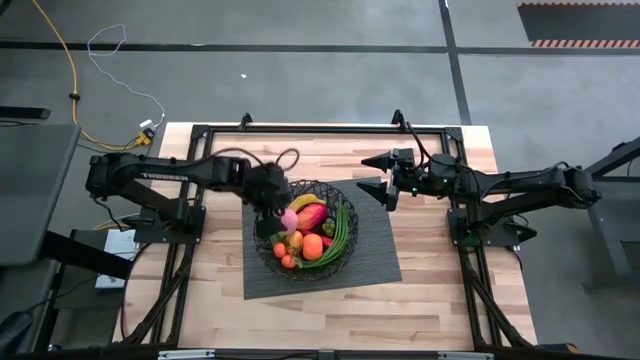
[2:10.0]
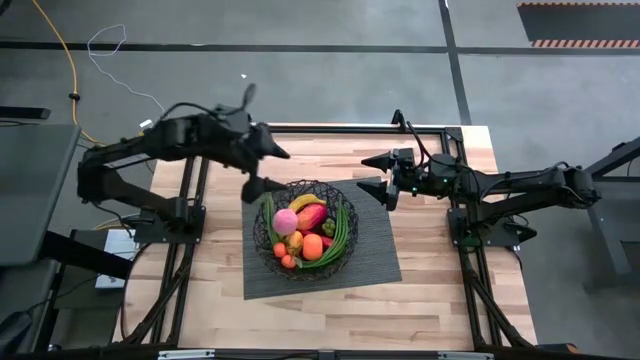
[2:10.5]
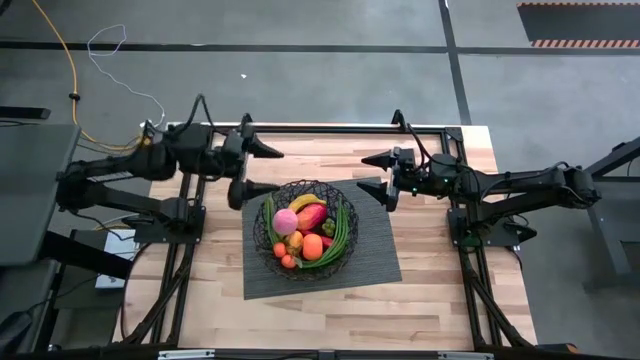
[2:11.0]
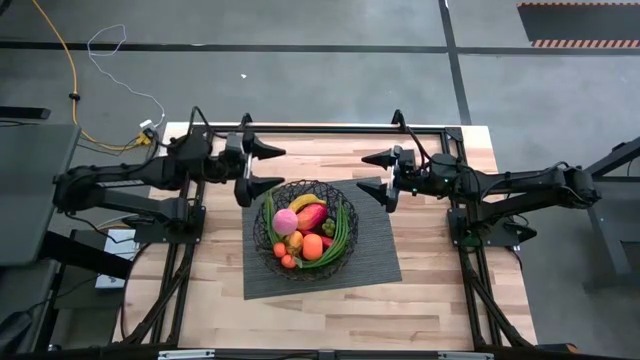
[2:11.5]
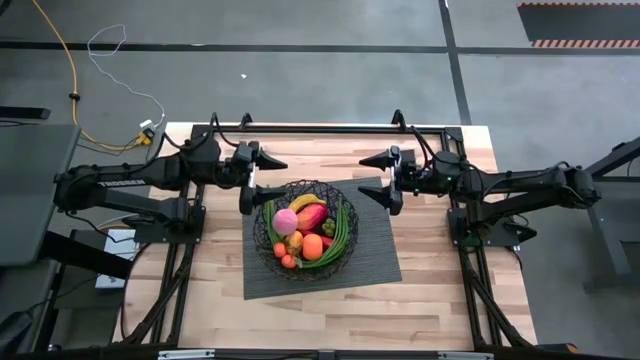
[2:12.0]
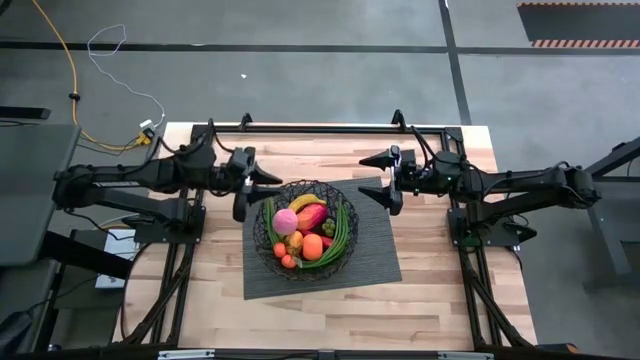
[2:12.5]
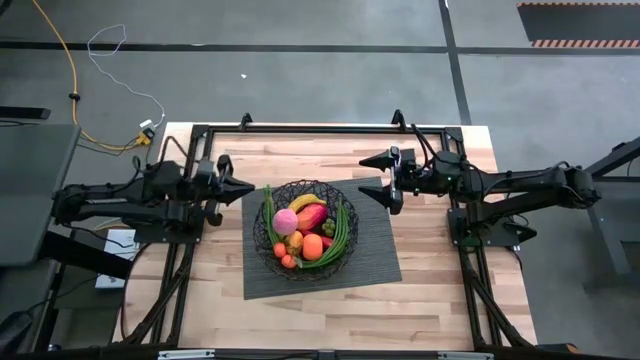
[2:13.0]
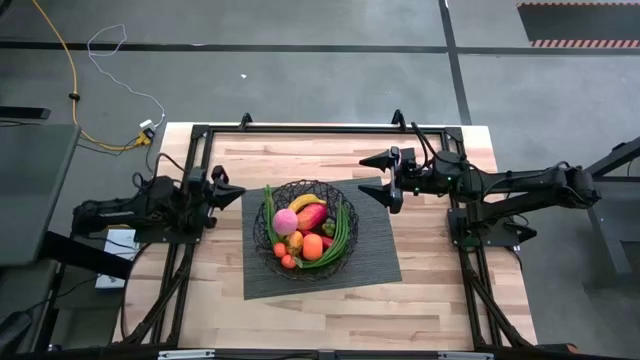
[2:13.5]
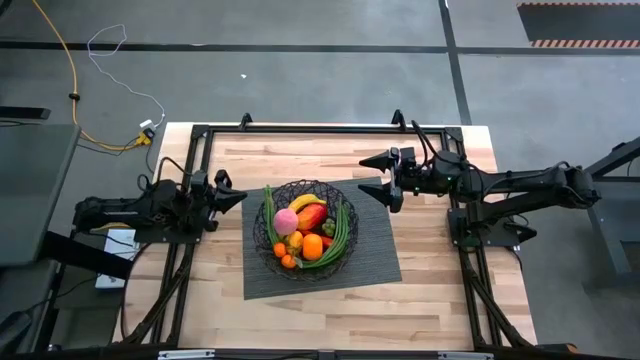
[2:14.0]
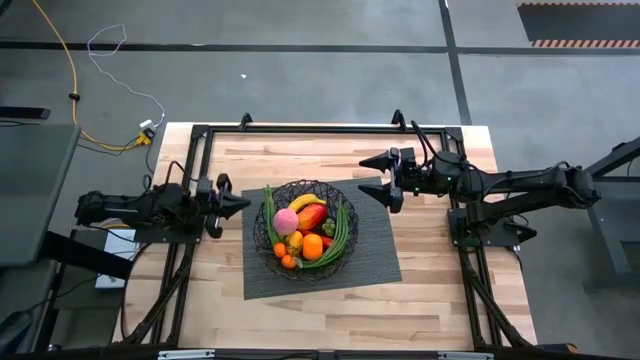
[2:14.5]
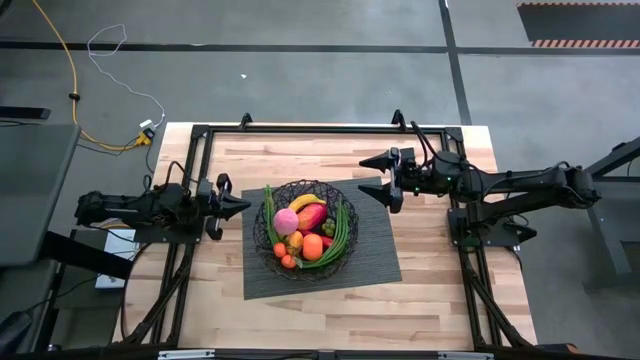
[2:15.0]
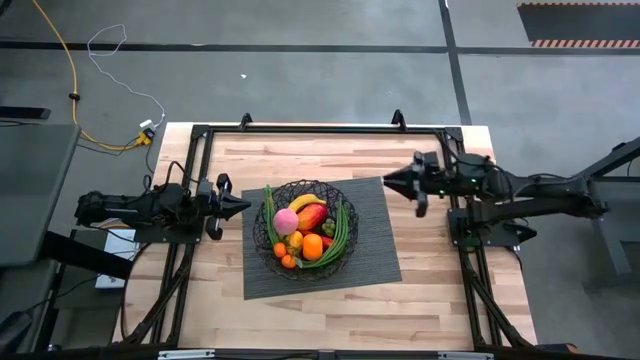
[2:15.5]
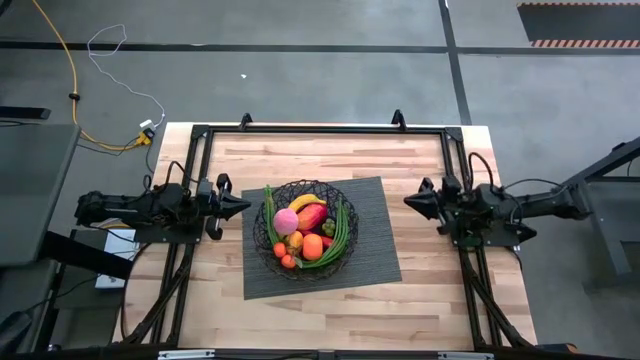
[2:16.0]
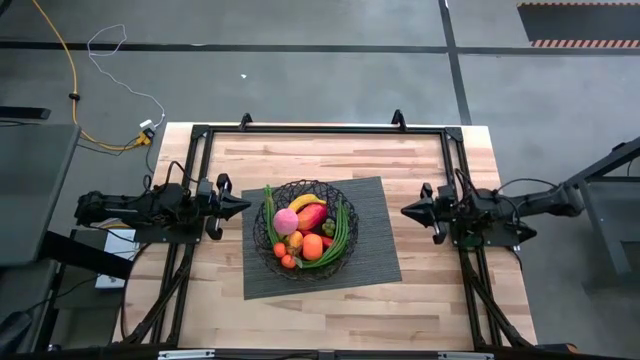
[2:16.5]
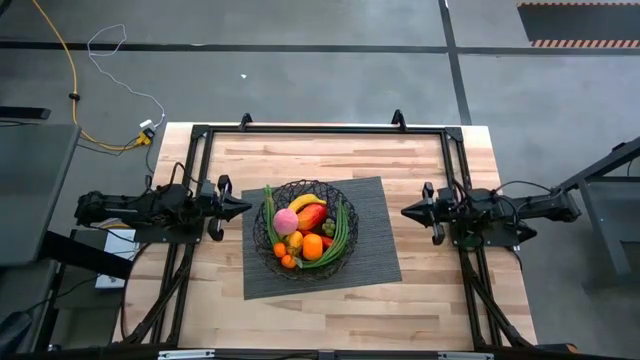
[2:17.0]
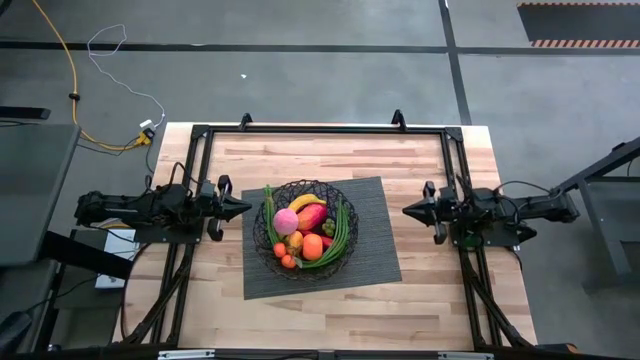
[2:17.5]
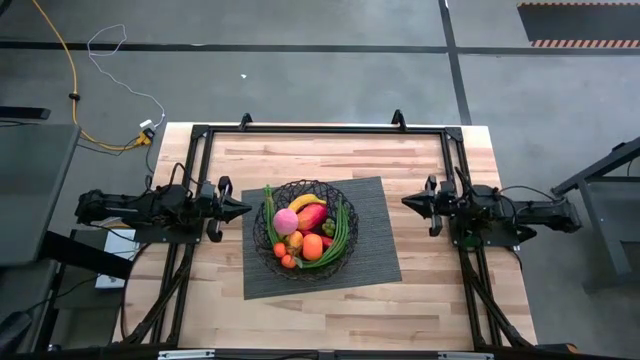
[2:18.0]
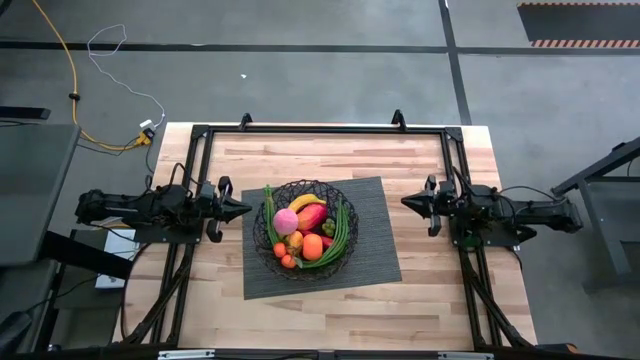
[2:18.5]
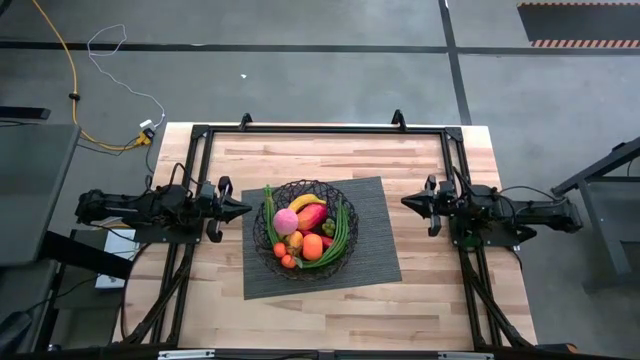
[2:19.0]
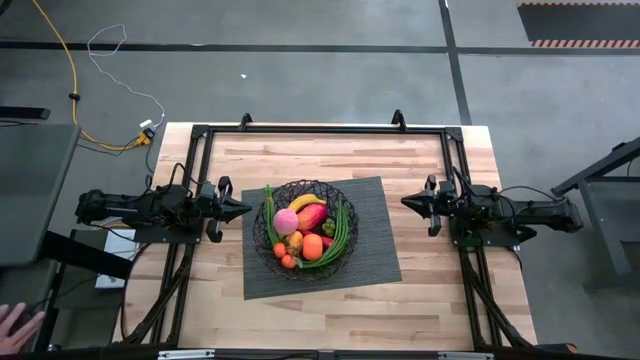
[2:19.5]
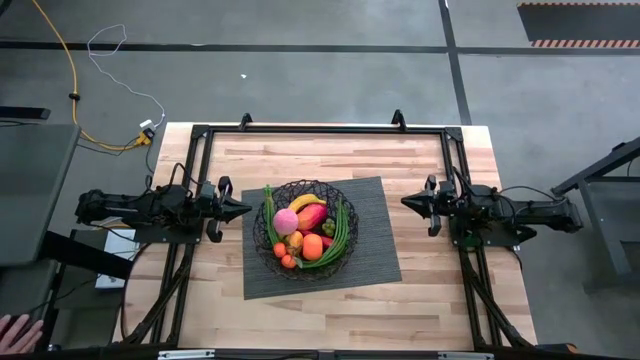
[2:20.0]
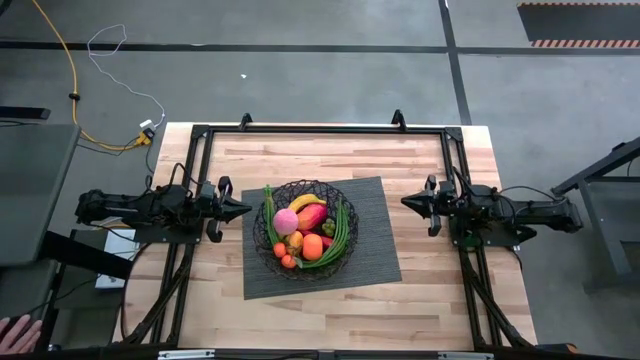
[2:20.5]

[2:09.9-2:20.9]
Task: Build produce basket
Return to Home Position
